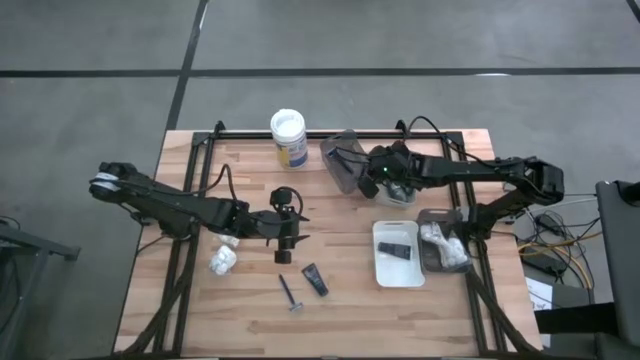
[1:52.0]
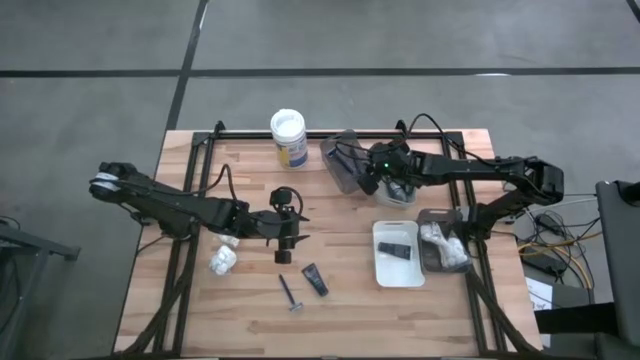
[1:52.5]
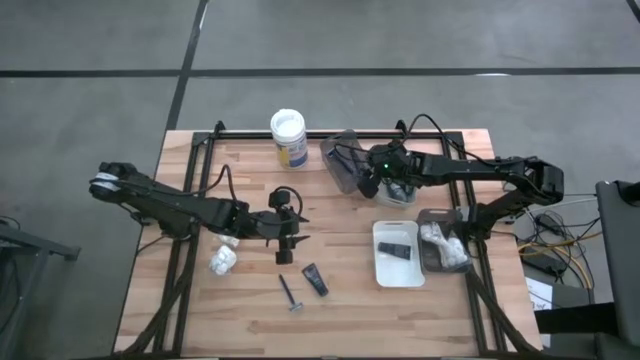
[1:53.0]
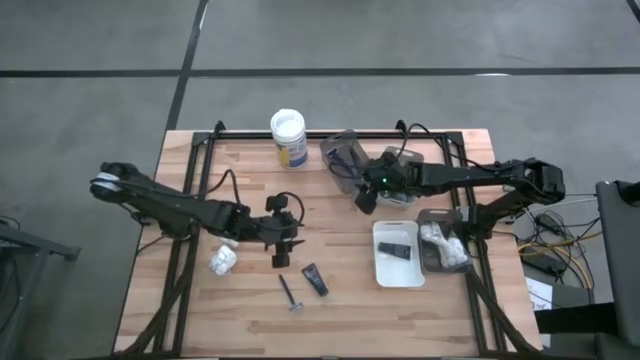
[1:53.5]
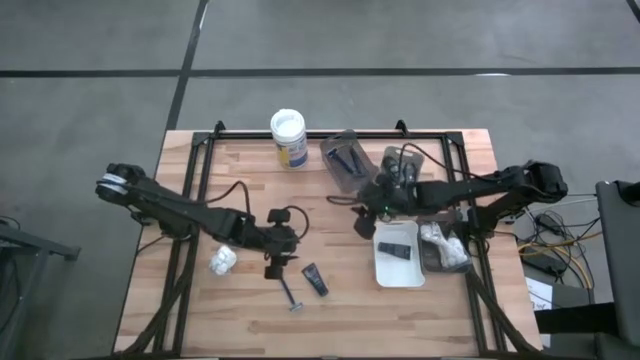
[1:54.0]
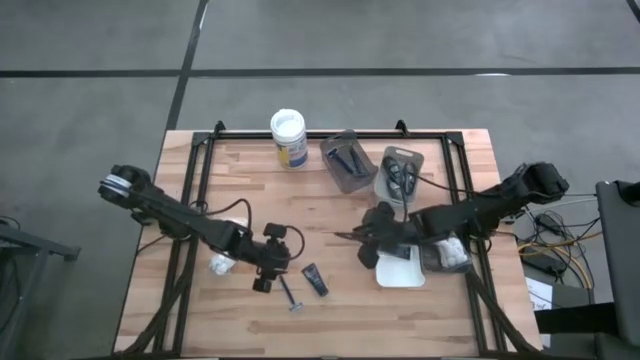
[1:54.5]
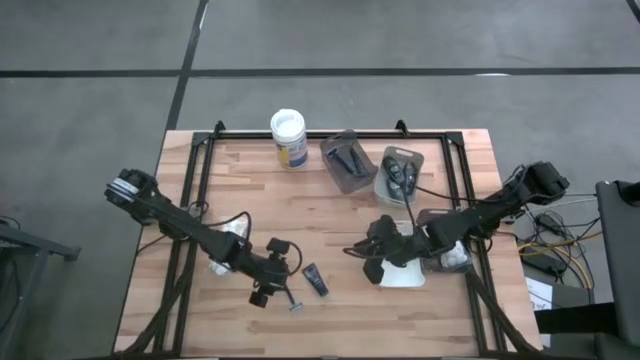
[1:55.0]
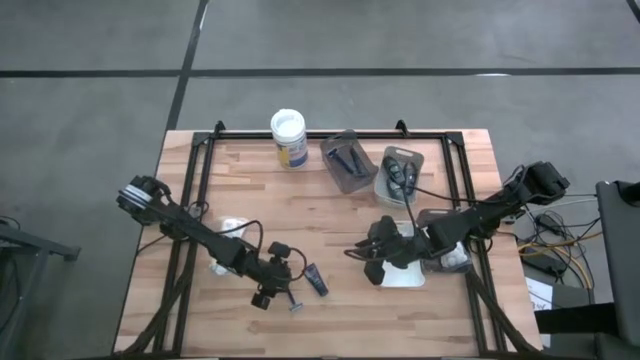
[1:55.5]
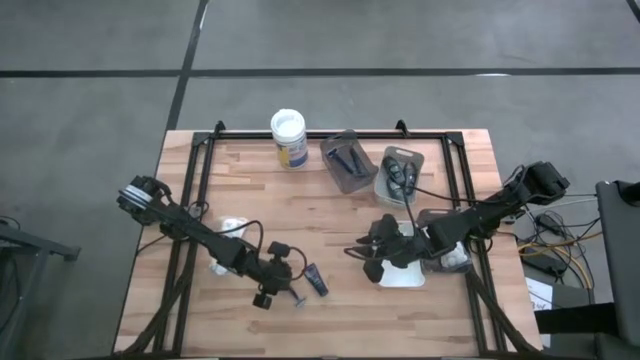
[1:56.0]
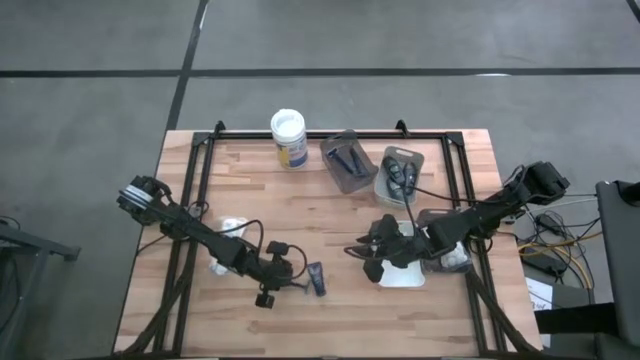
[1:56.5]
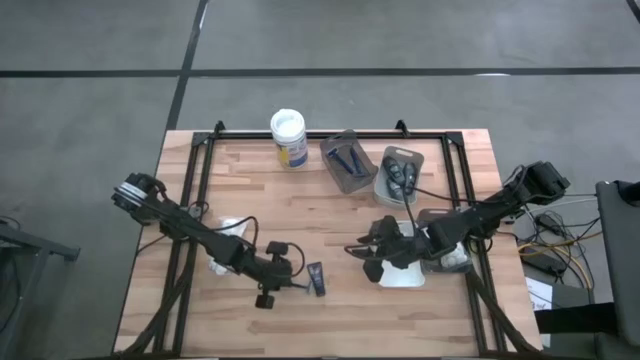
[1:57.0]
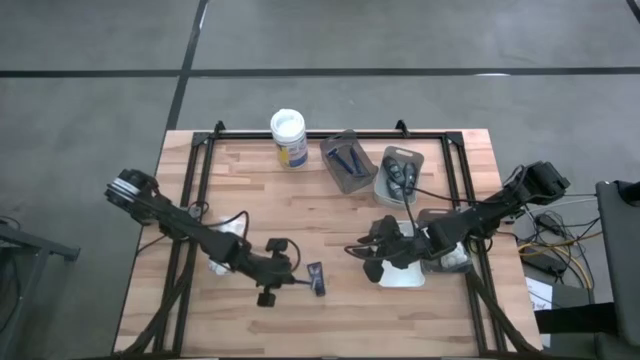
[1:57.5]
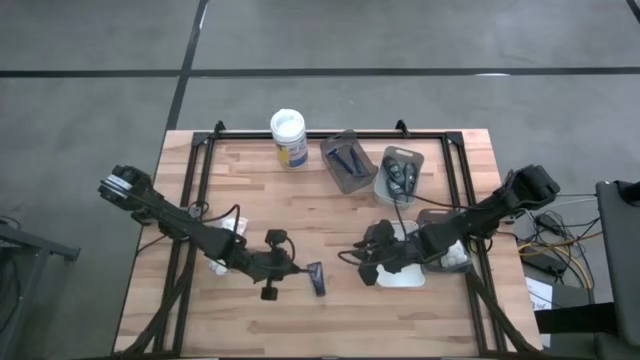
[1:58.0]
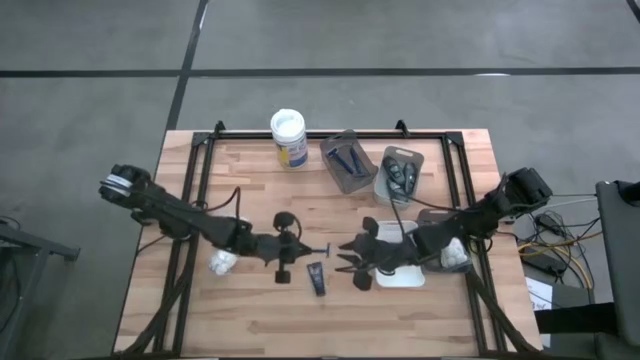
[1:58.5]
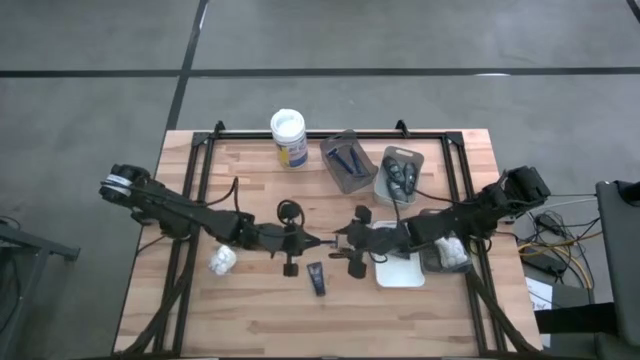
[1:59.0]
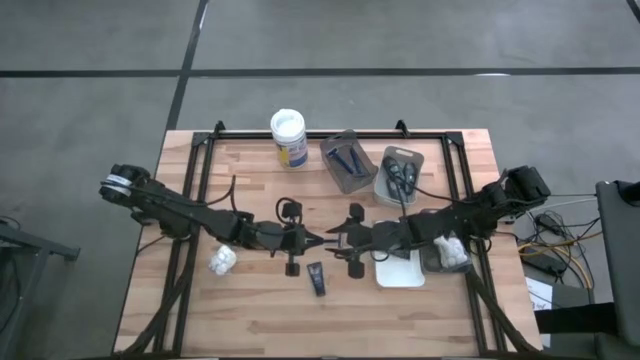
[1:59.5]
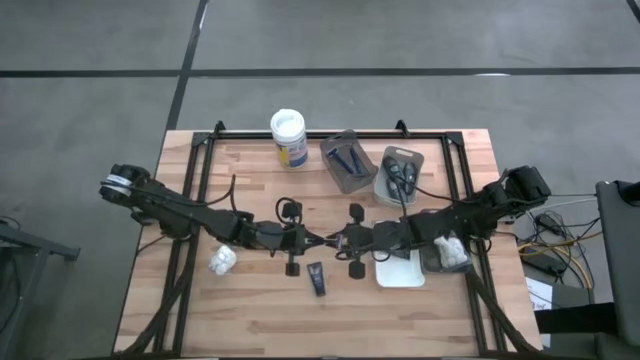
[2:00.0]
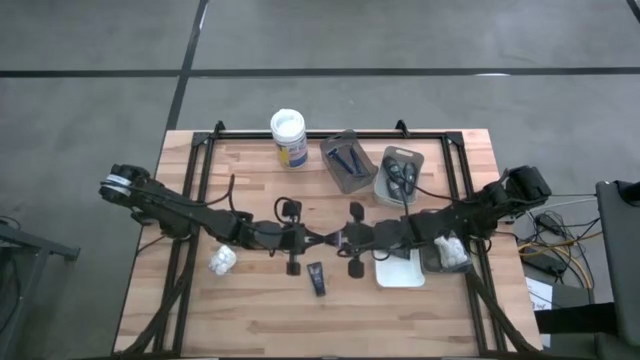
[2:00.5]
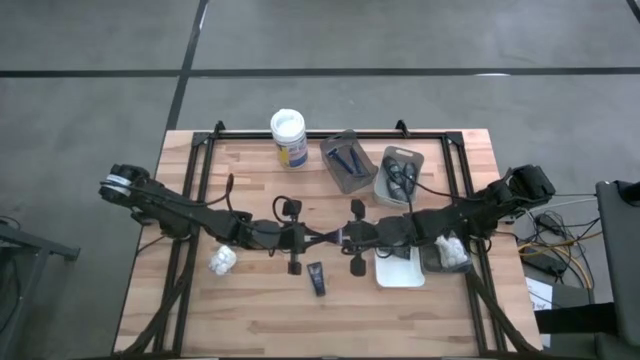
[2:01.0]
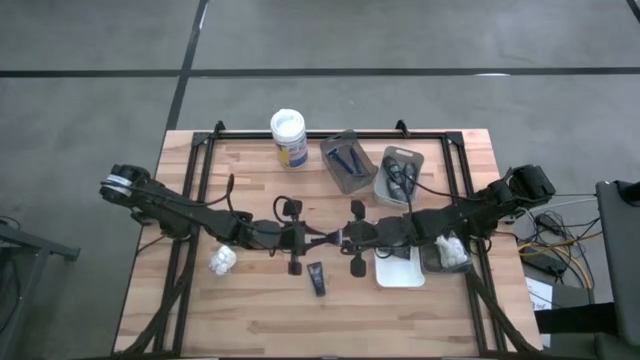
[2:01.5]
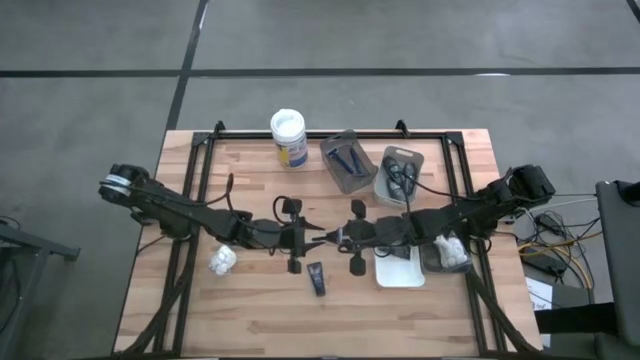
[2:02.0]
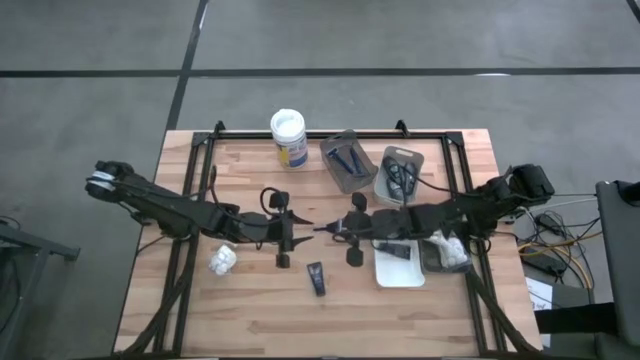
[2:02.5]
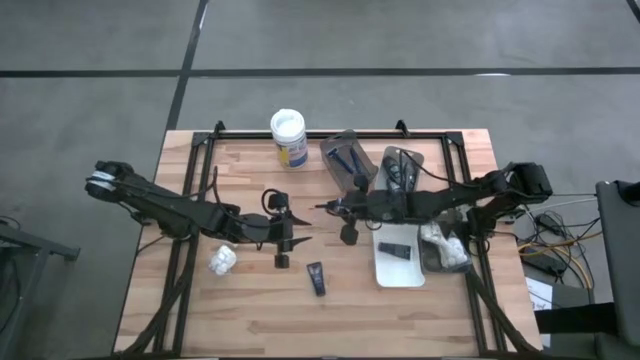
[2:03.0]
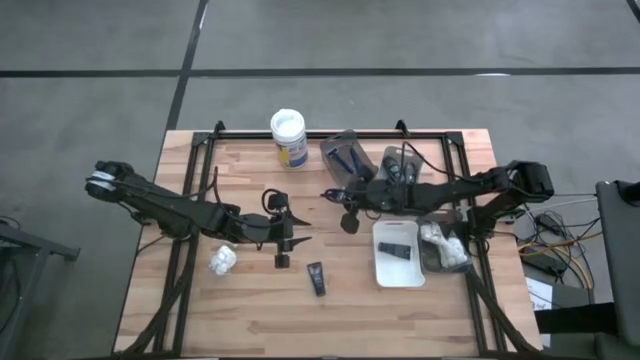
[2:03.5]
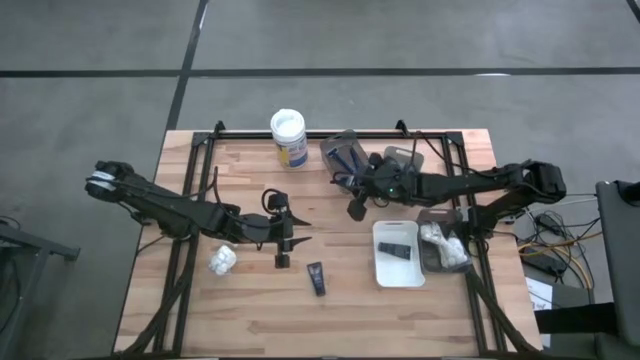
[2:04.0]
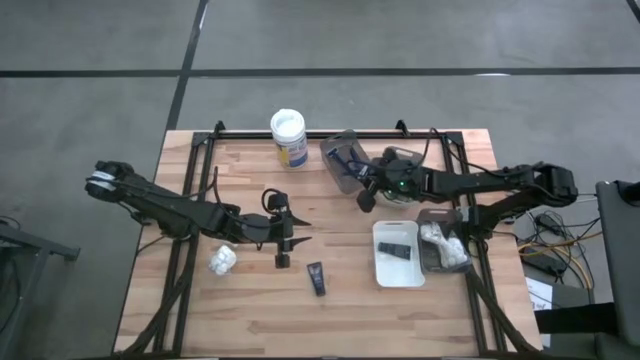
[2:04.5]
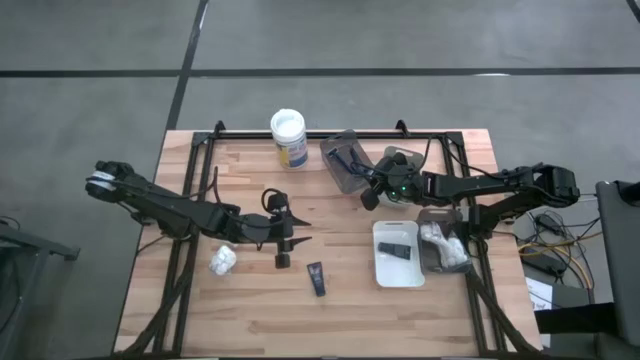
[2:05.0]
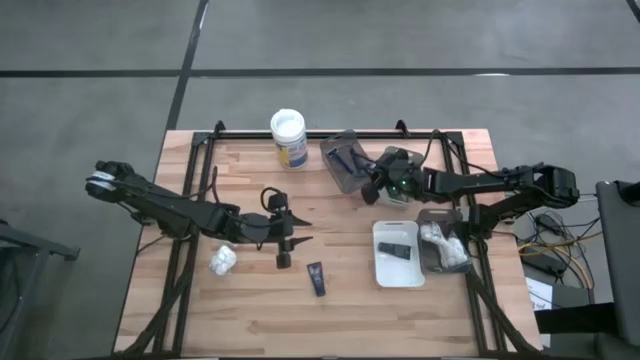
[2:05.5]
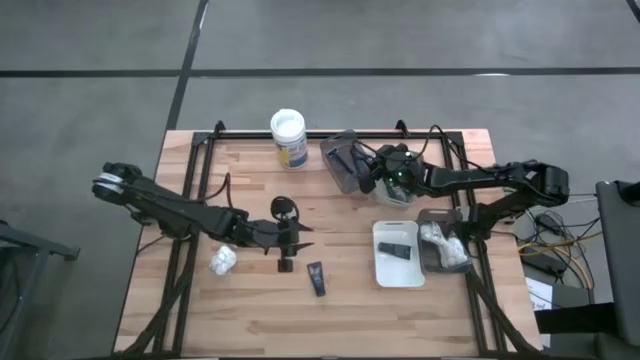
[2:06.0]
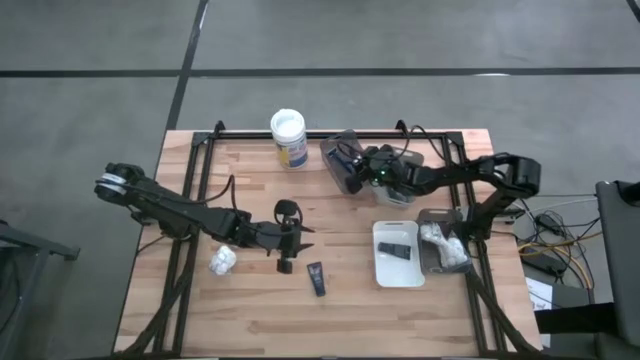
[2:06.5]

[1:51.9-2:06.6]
Task: Pick & Place Travel size toiletries
Put the blue razor into the top black bin

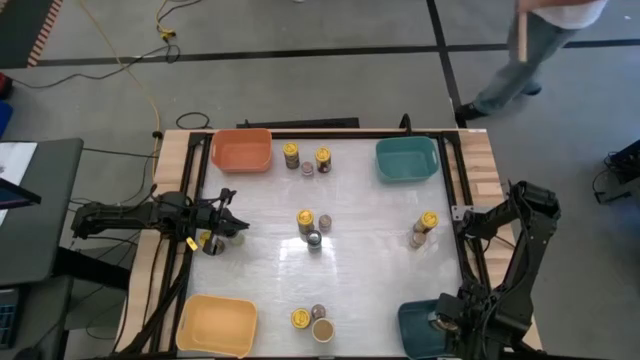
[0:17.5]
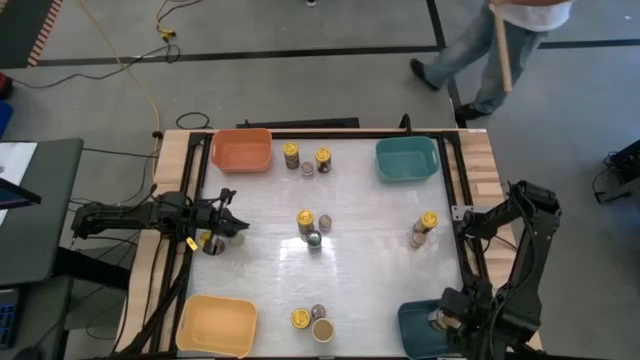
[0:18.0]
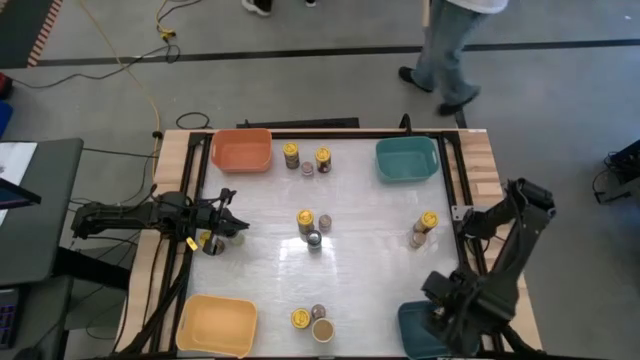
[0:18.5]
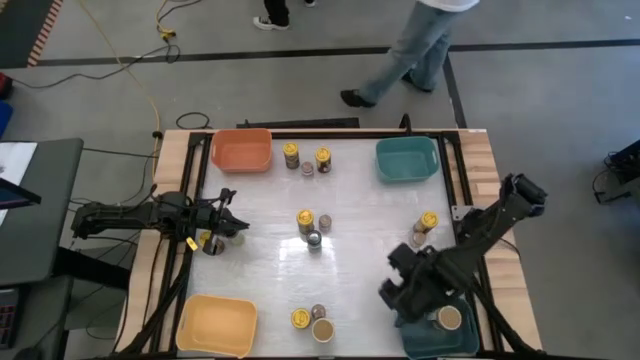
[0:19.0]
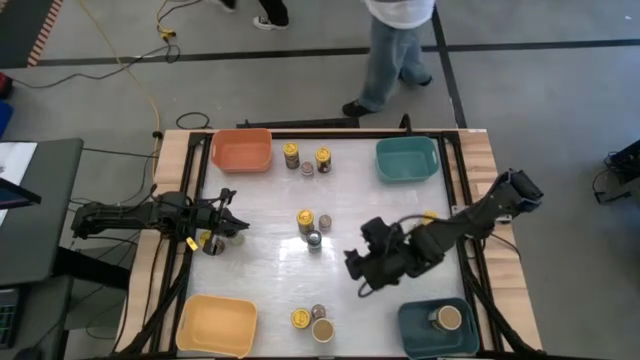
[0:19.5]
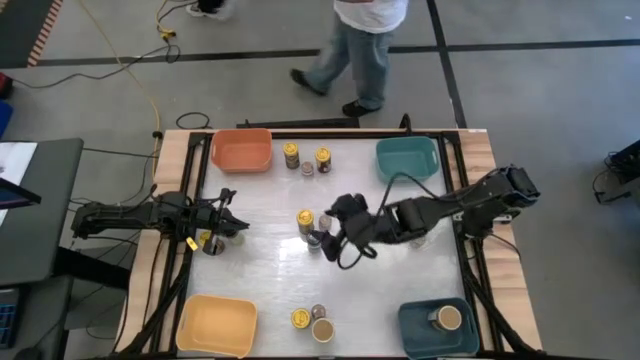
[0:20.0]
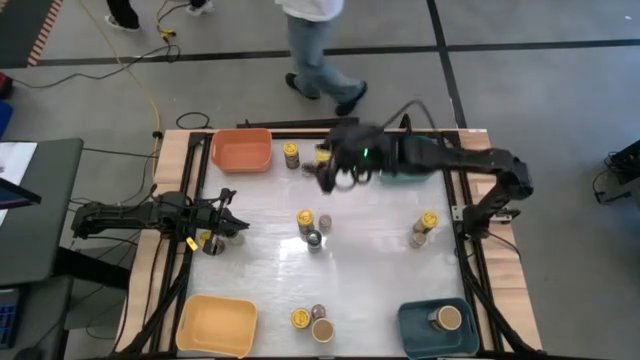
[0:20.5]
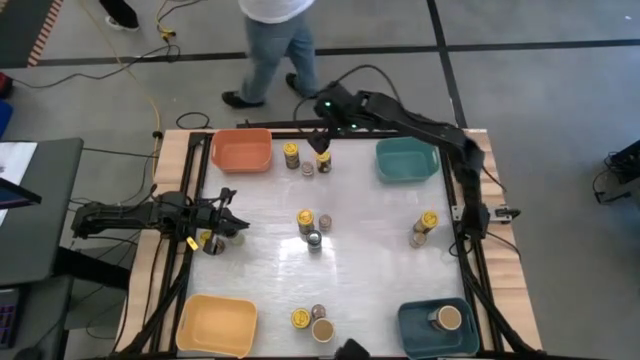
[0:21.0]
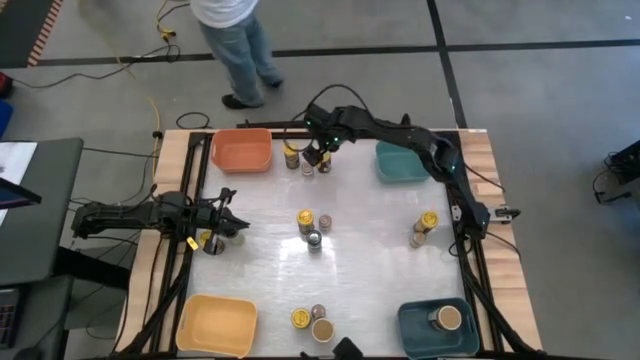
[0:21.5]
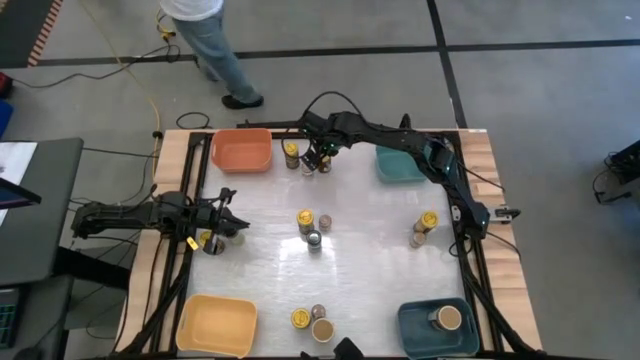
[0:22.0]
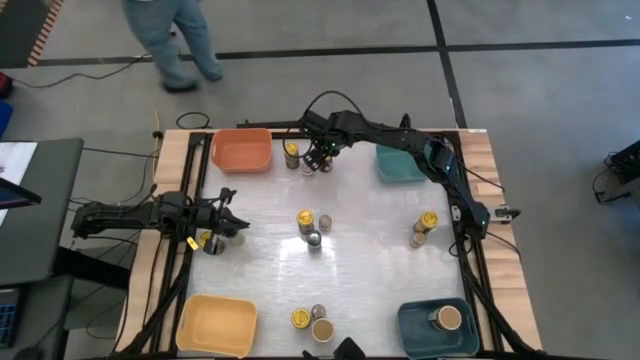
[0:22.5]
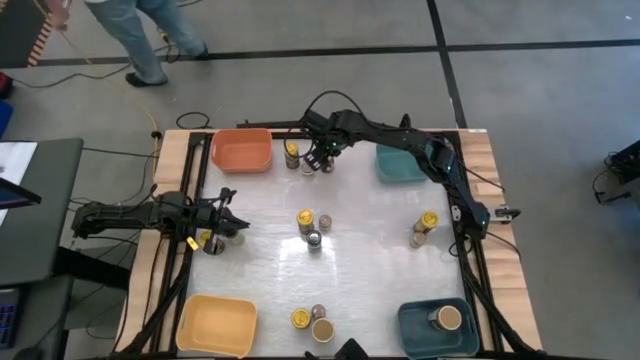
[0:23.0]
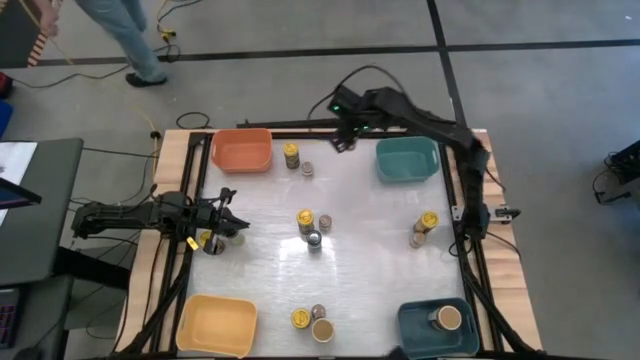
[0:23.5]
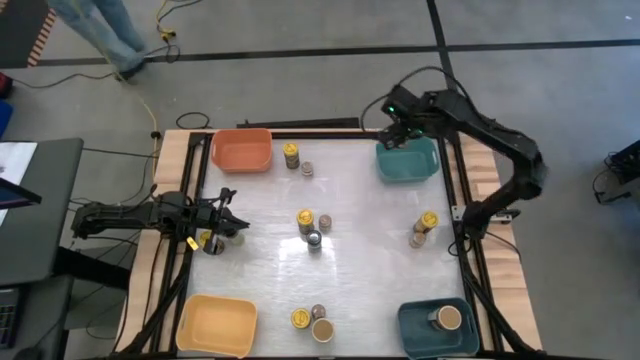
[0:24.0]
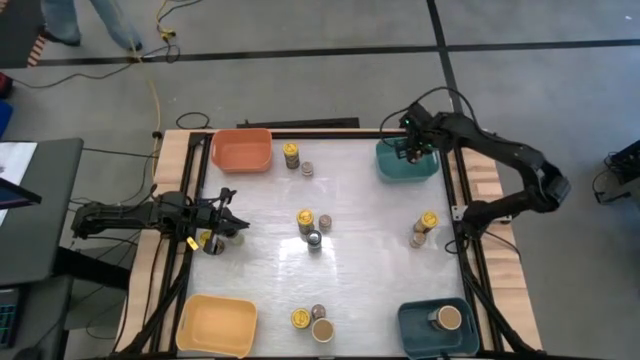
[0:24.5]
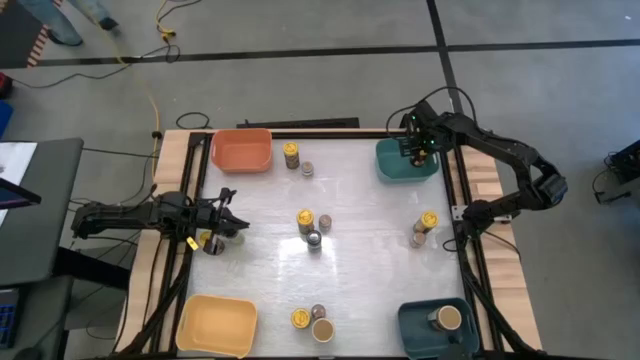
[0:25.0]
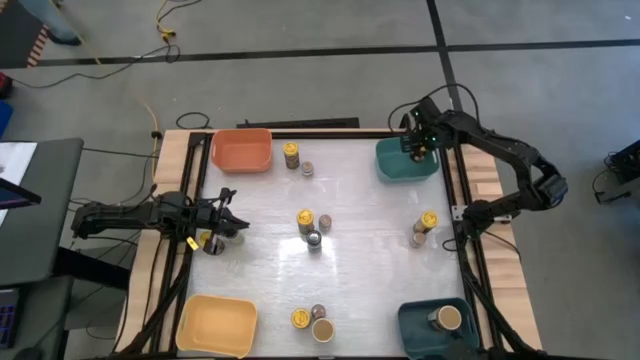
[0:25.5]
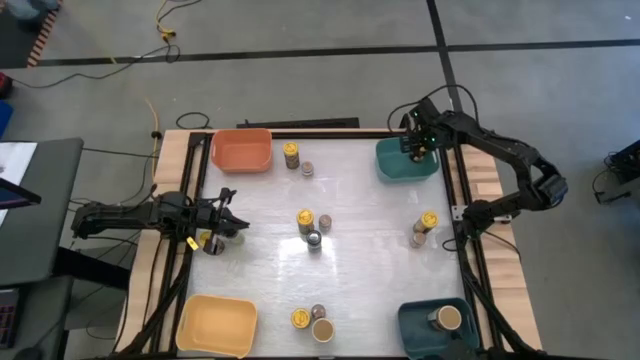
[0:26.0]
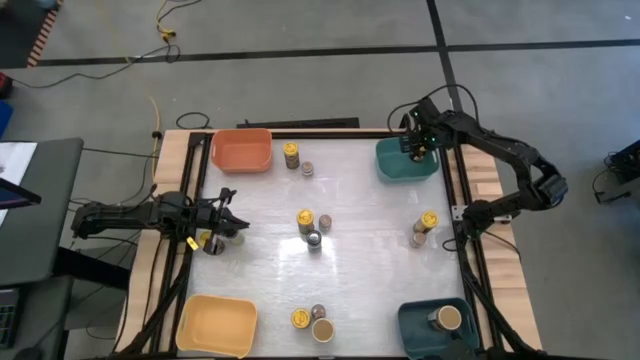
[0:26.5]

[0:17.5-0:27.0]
Task: Sort spices by type
Put the top right yellow seasoning bottle into the light blue bin
